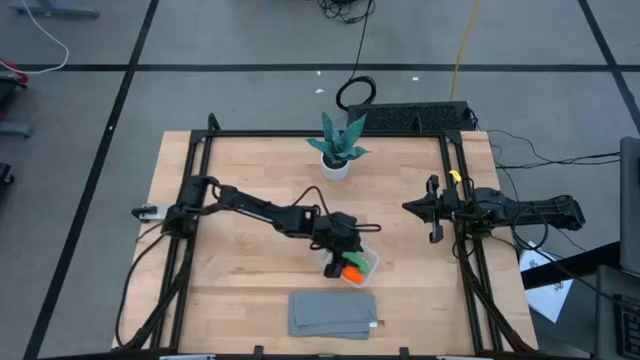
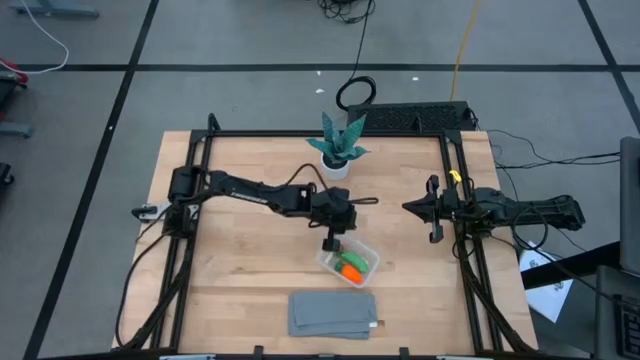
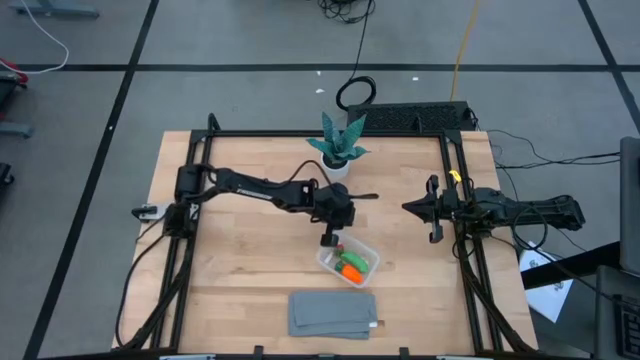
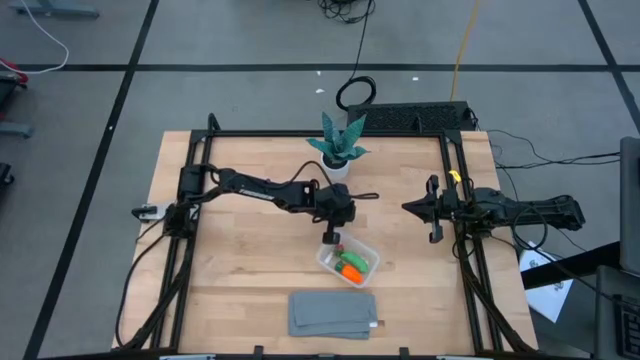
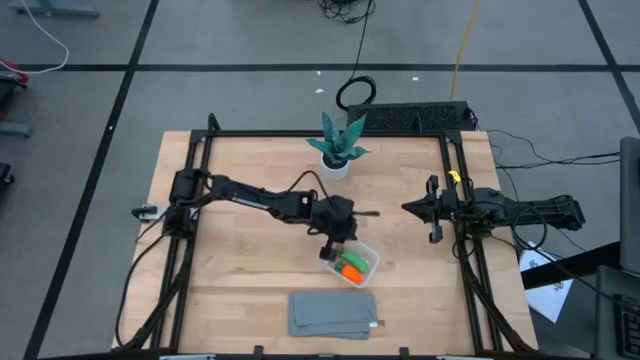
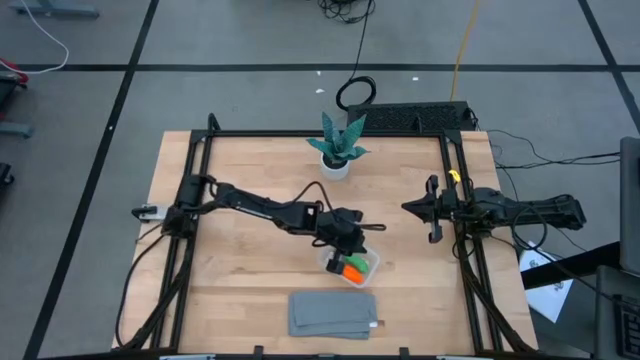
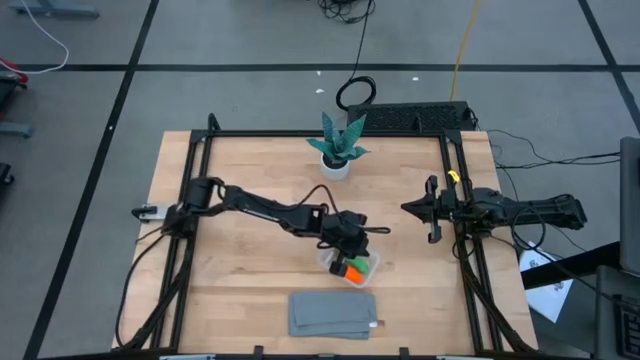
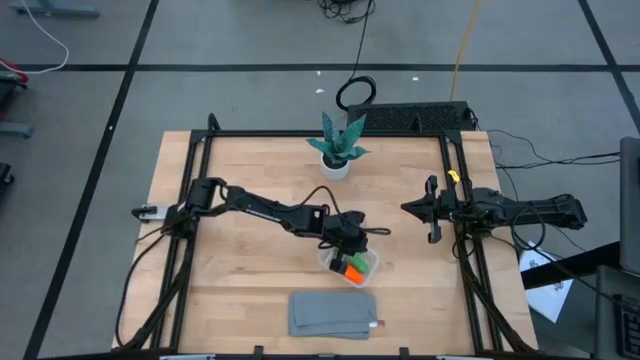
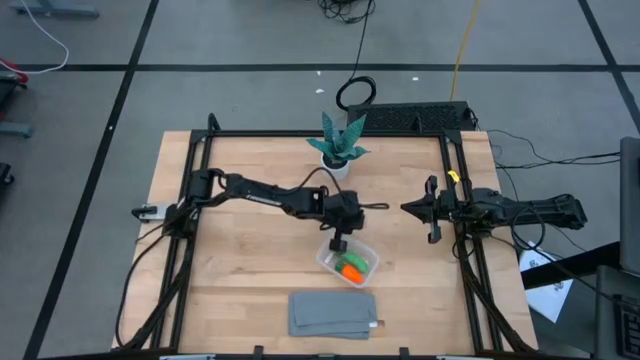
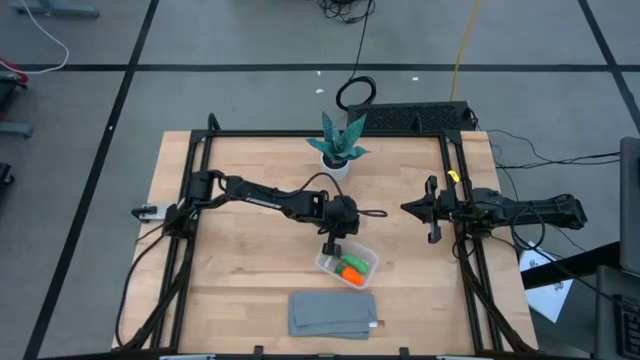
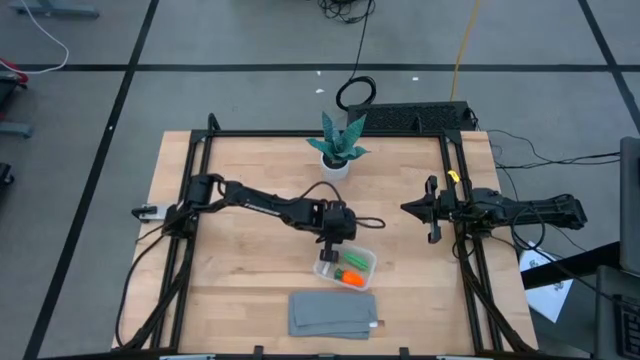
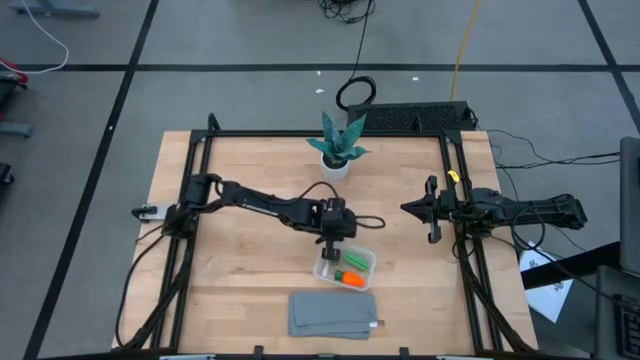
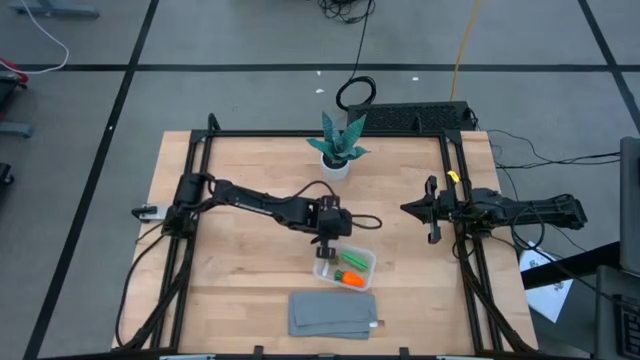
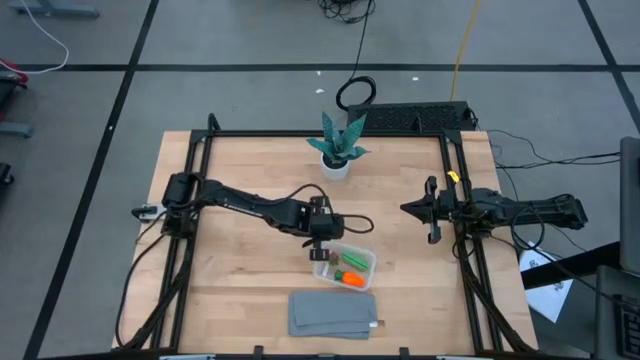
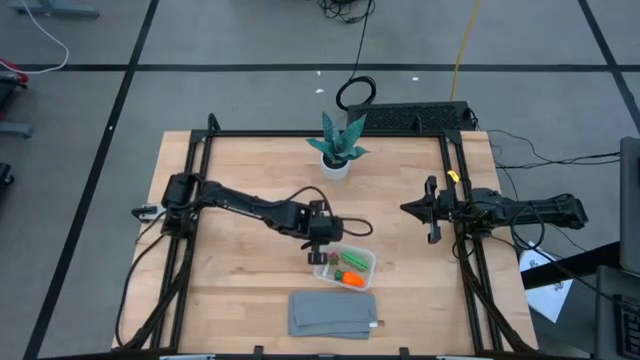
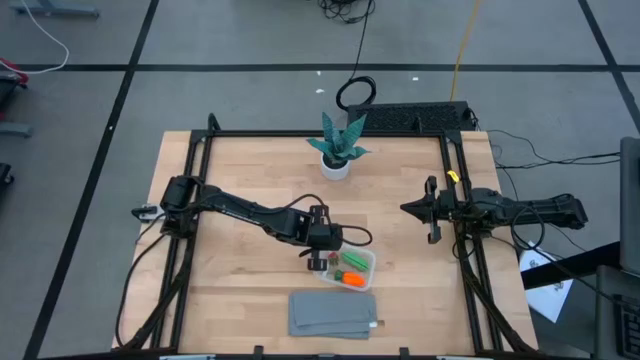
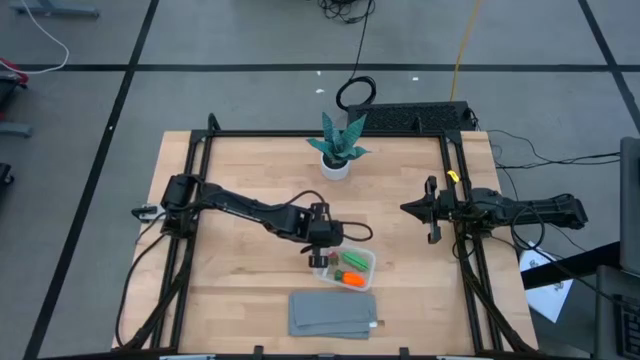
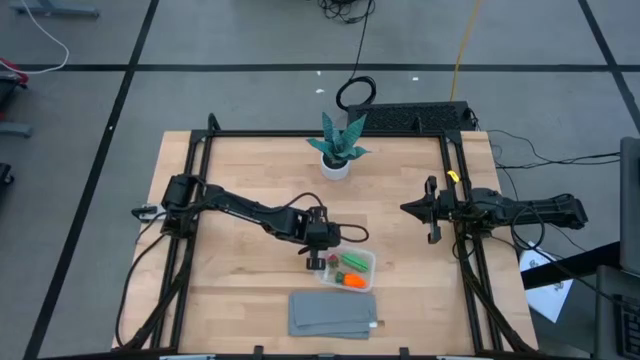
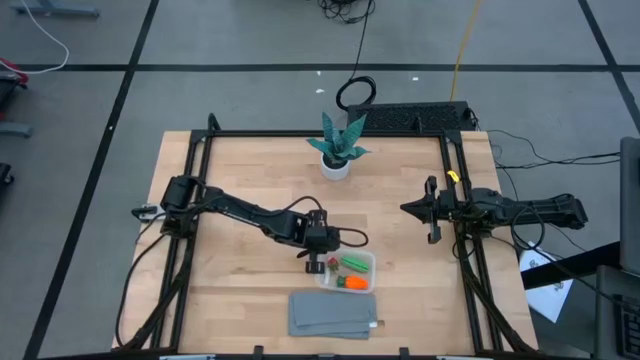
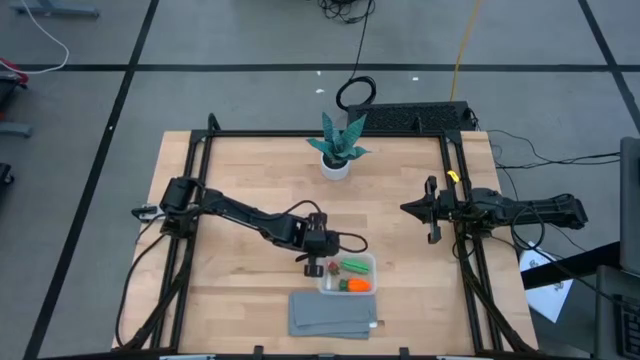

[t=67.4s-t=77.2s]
Task: Pick and placing Produce into tupperware
Adjust the transparent bin

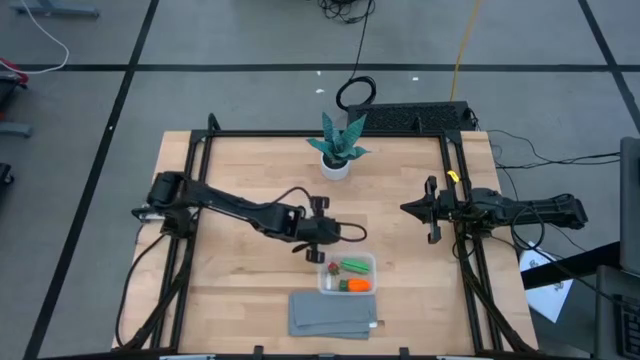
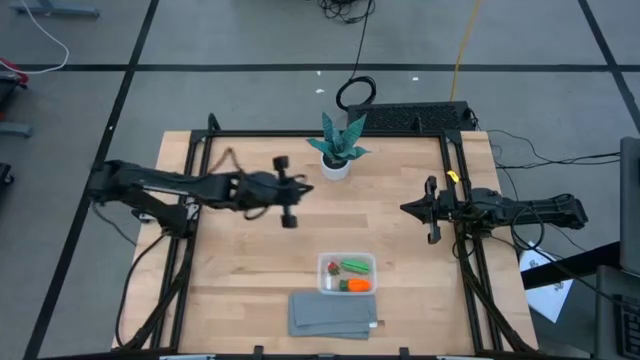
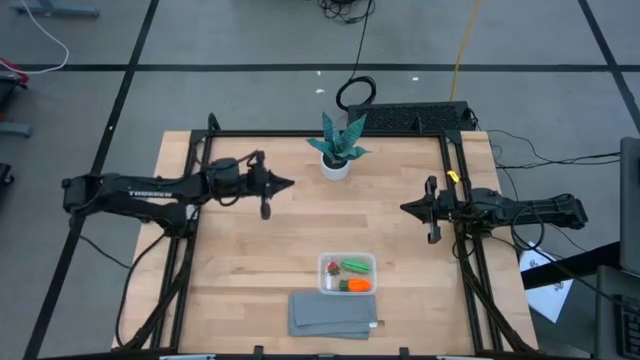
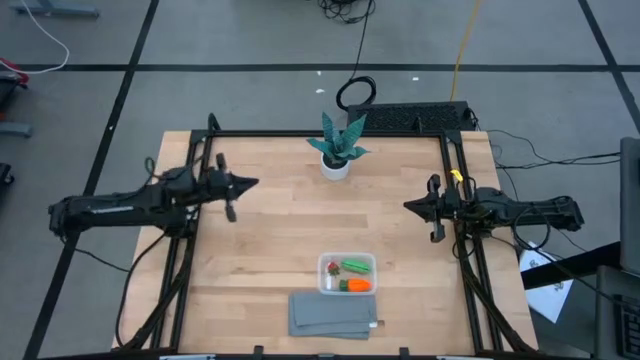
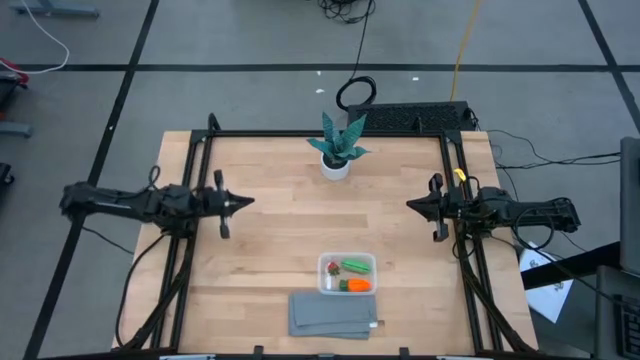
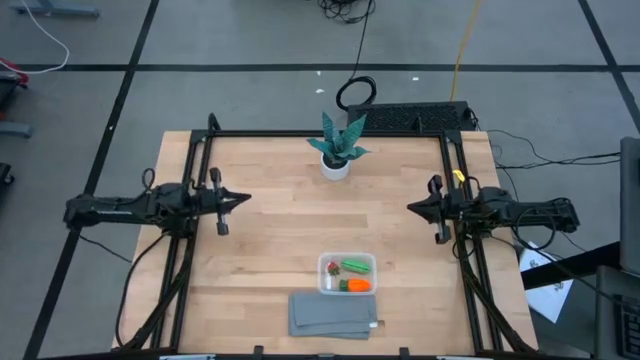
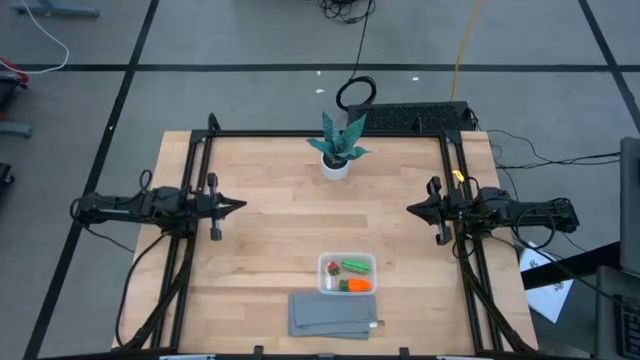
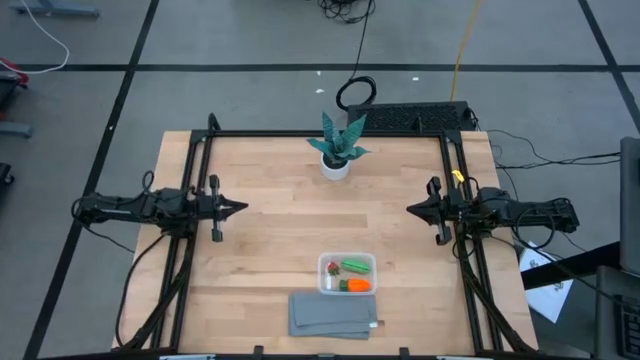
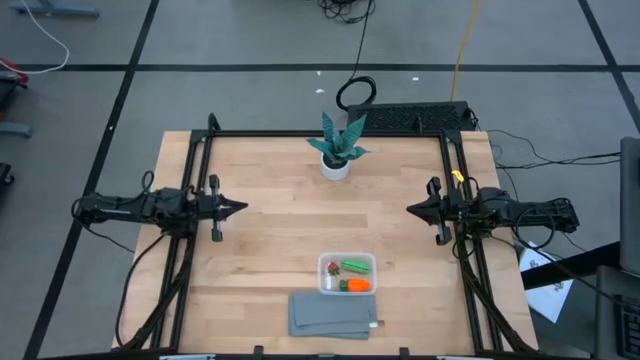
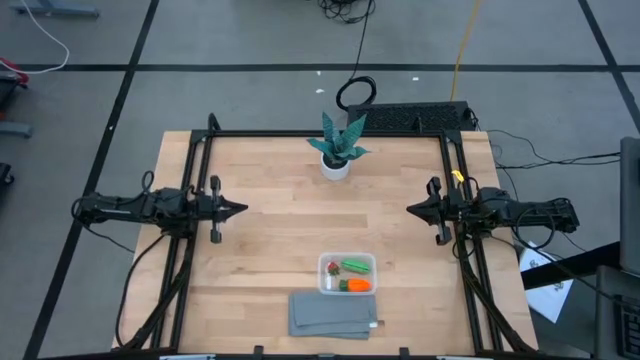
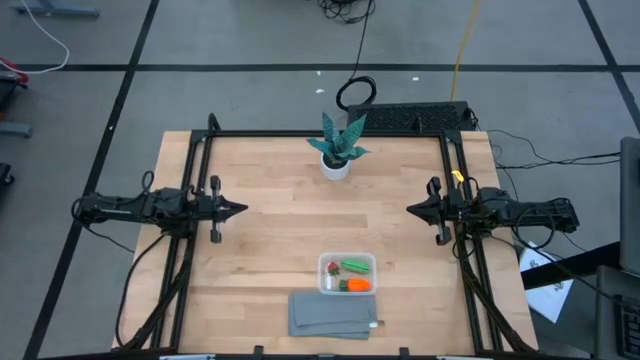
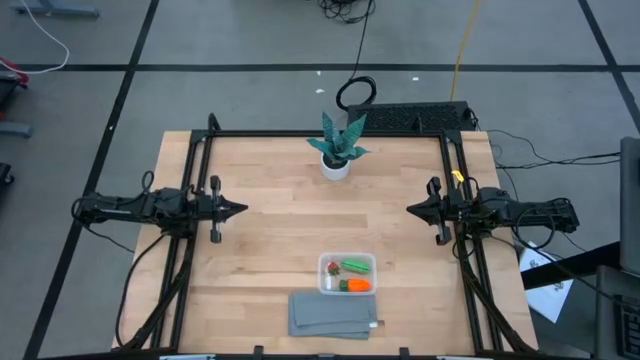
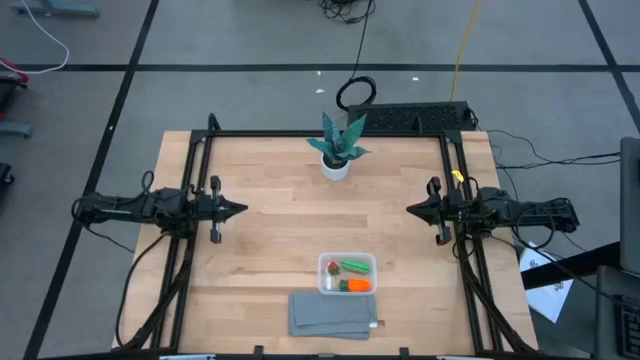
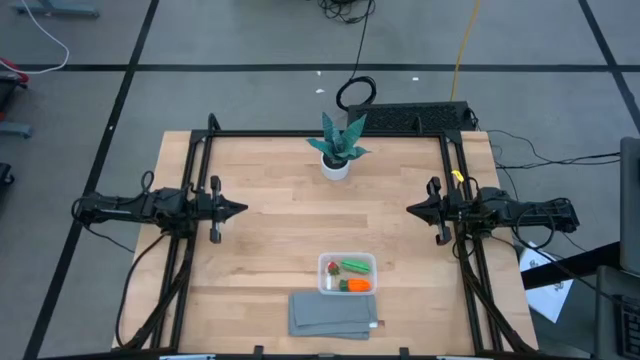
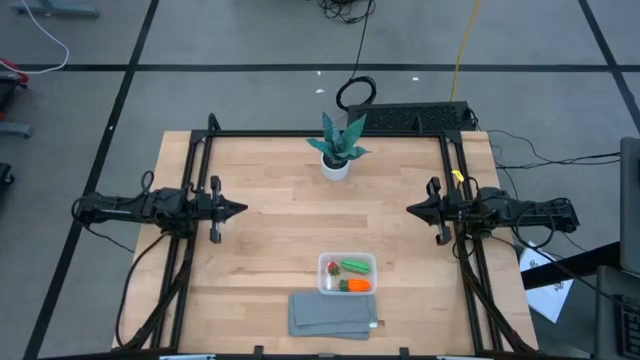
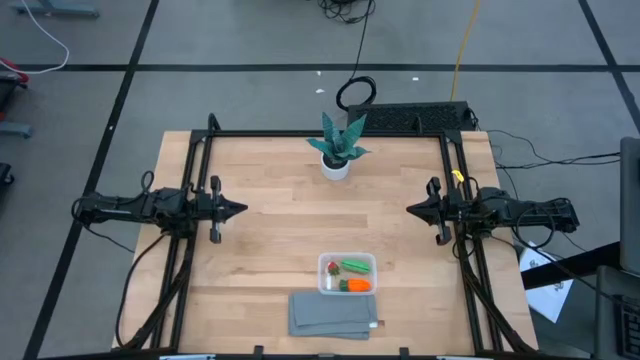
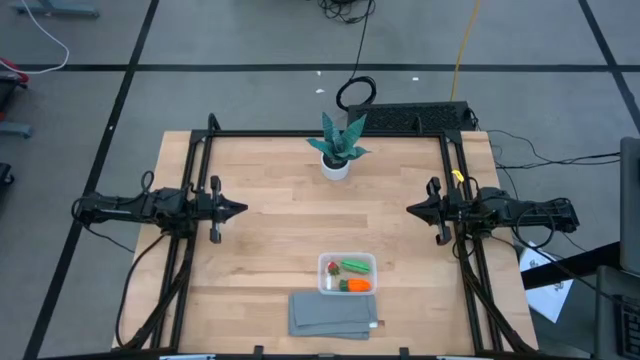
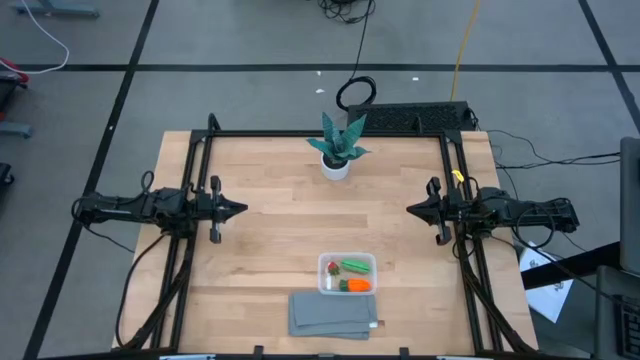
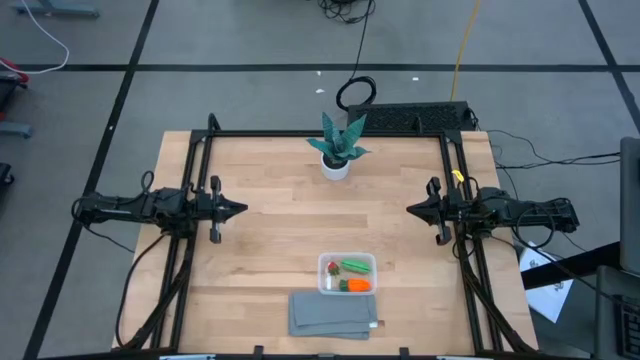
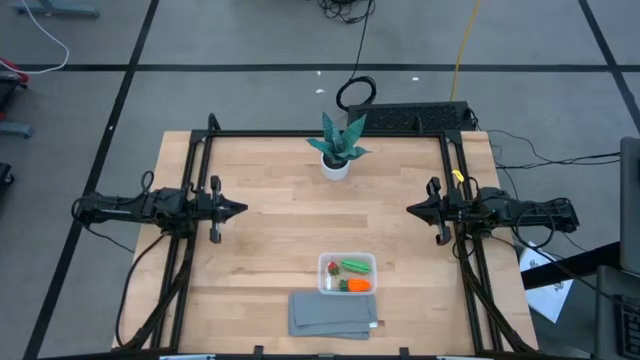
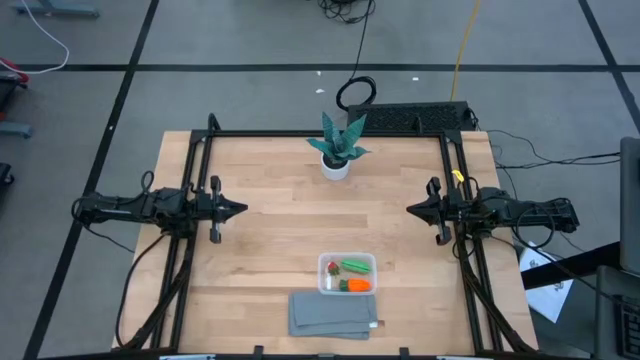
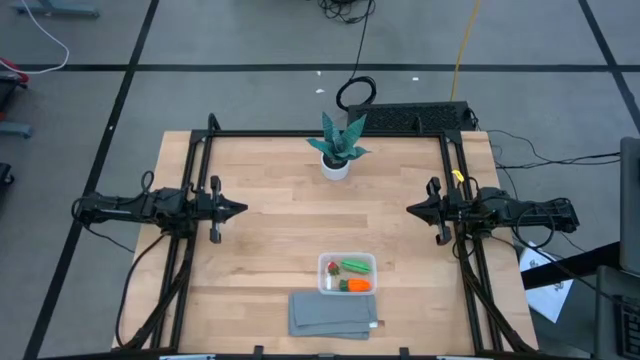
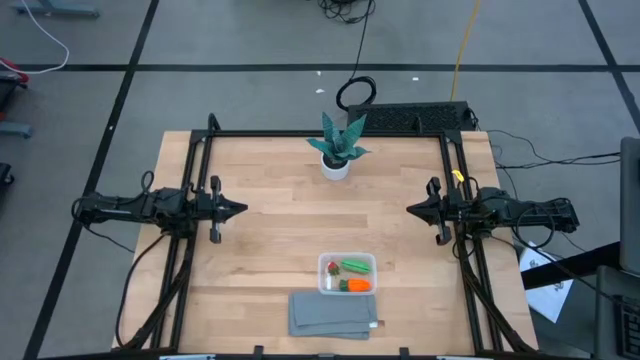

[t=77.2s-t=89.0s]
Return to Home Position

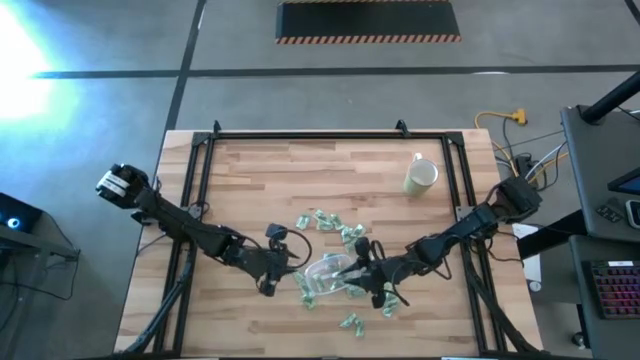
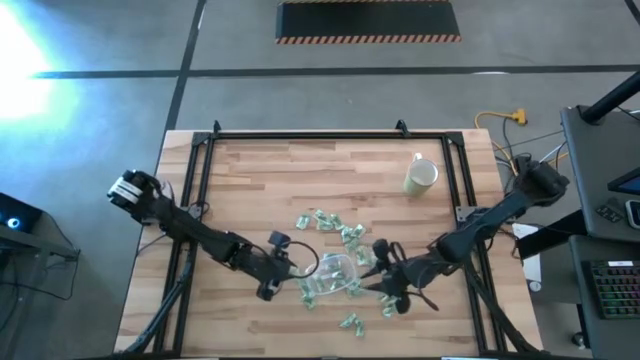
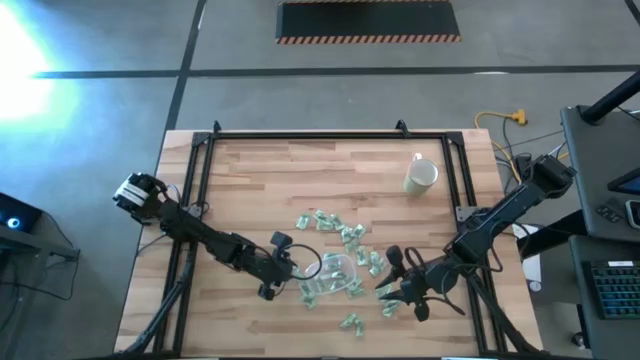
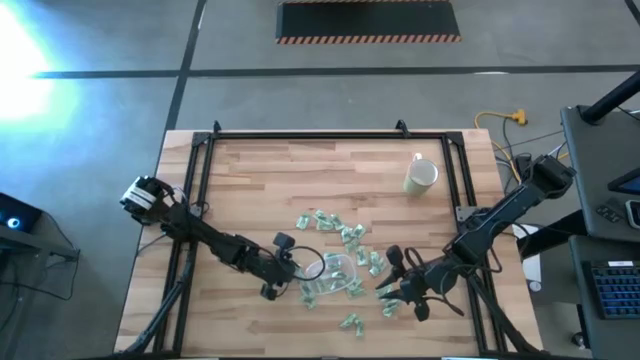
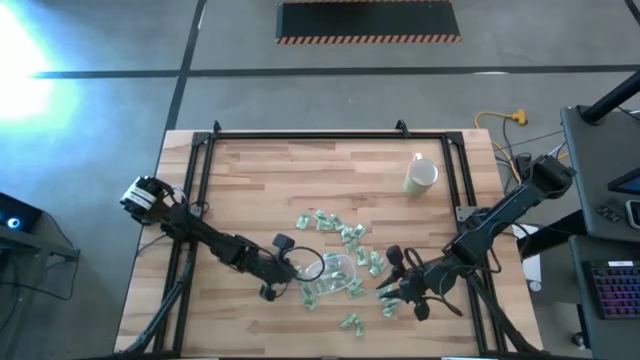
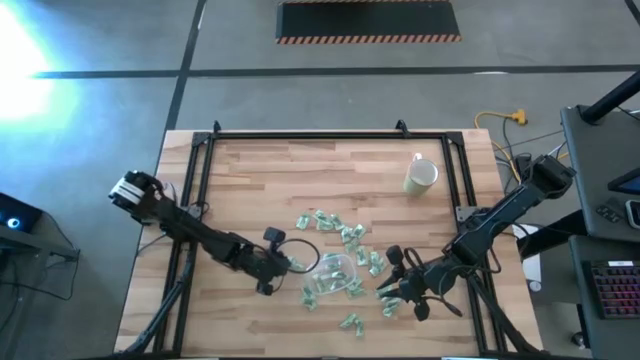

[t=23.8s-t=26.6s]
Task: Pick and place items into bin
Put the Stevia packet into the transparent bin
